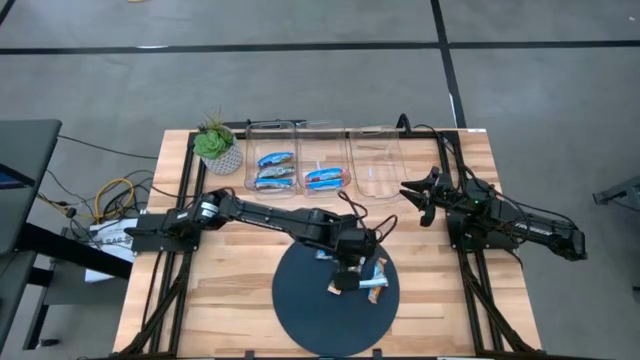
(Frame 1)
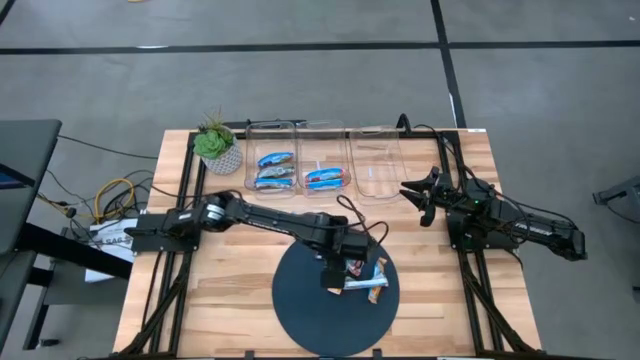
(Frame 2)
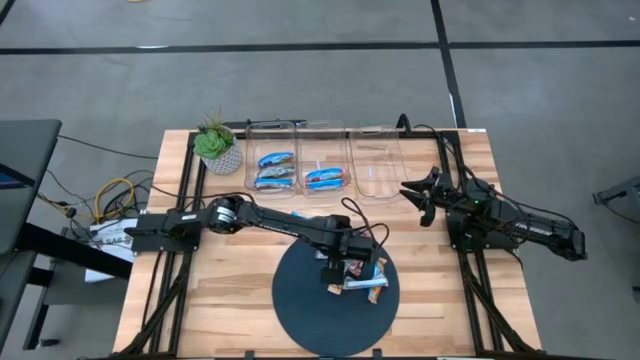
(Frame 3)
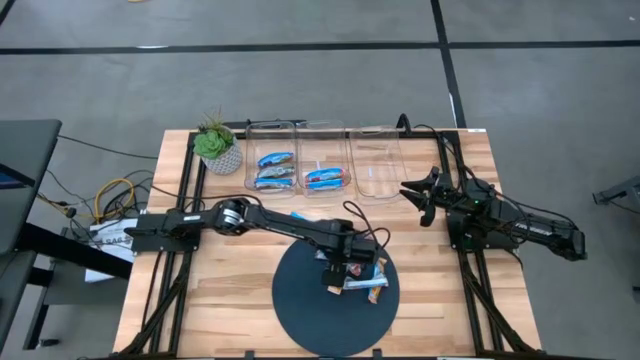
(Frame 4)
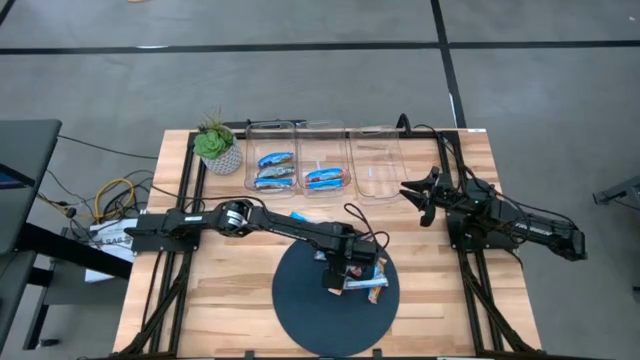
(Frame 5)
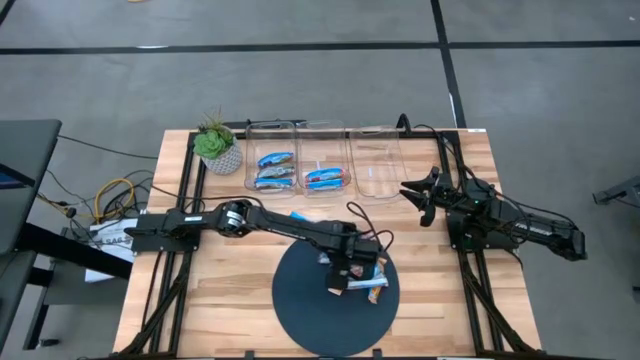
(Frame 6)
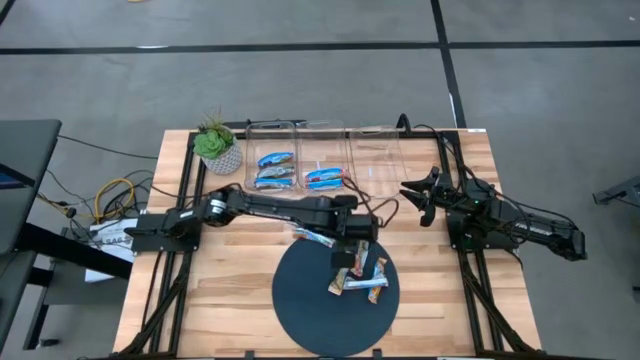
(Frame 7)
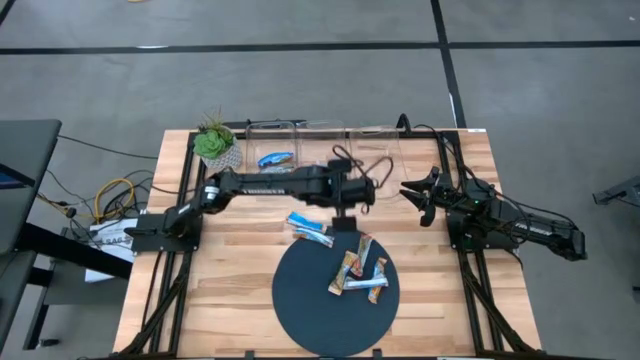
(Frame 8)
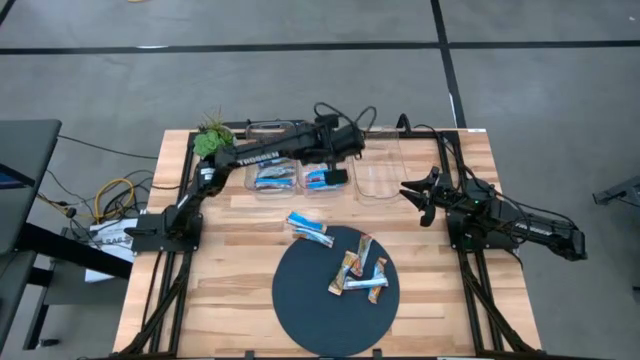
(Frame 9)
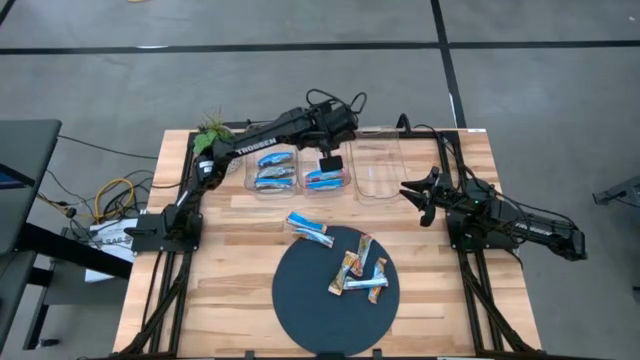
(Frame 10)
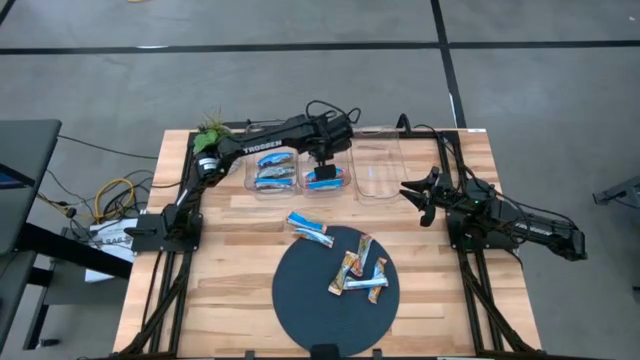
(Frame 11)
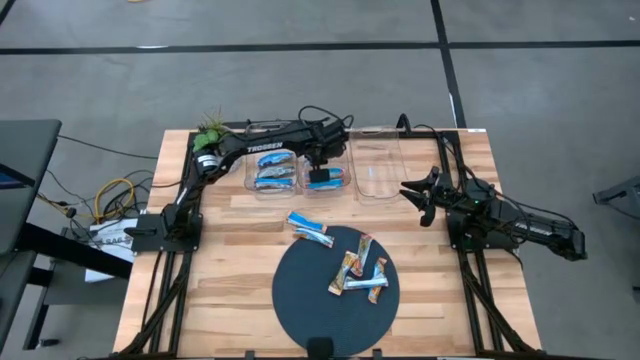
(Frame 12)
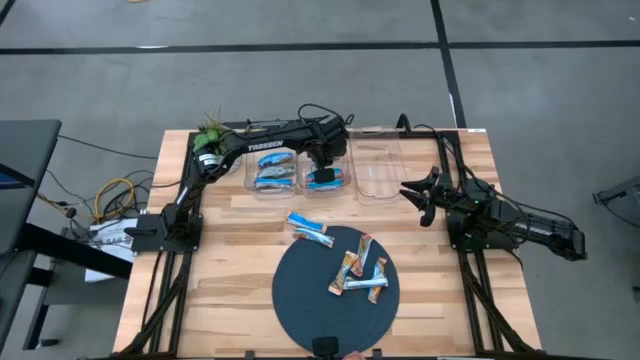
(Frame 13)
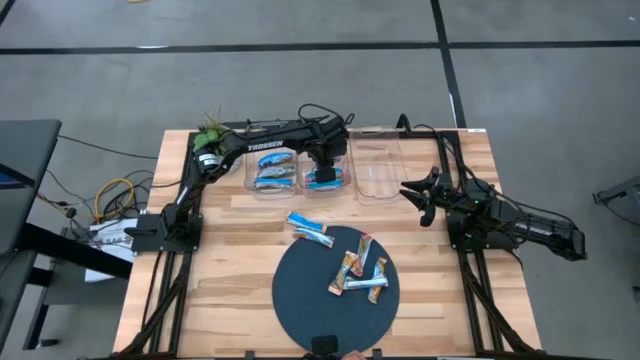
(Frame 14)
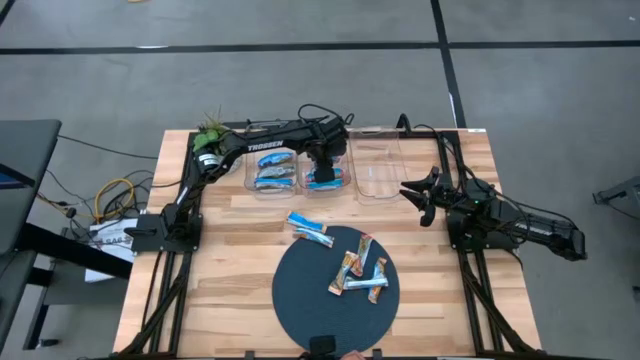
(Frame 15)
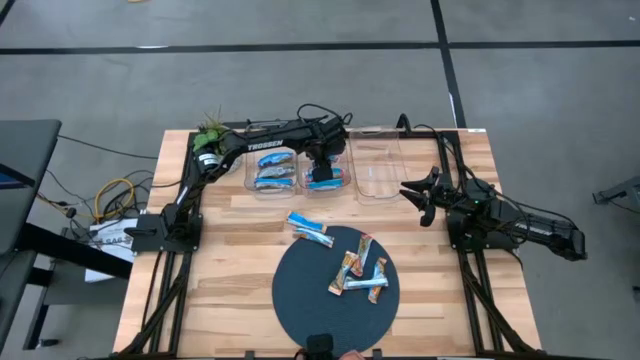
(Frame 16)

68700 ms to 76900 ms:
Task: Pick and place Granola Bars by type
Put the red granola bar into the middle transparent bin

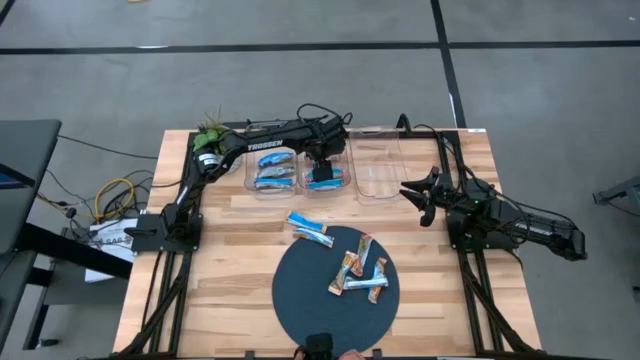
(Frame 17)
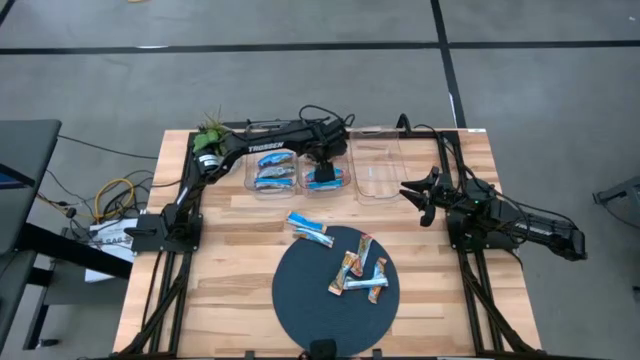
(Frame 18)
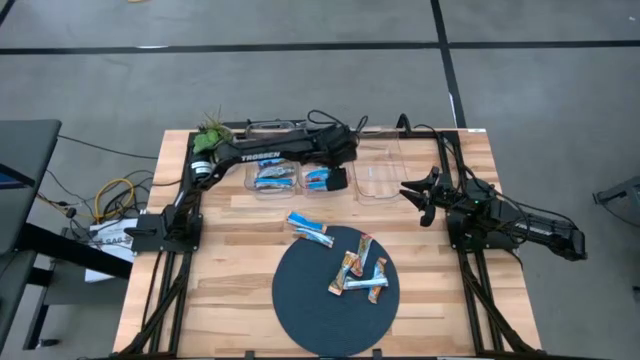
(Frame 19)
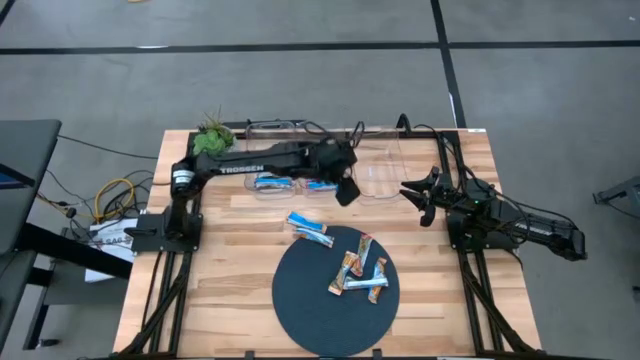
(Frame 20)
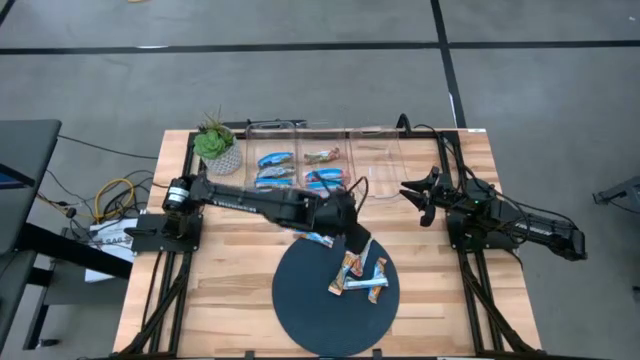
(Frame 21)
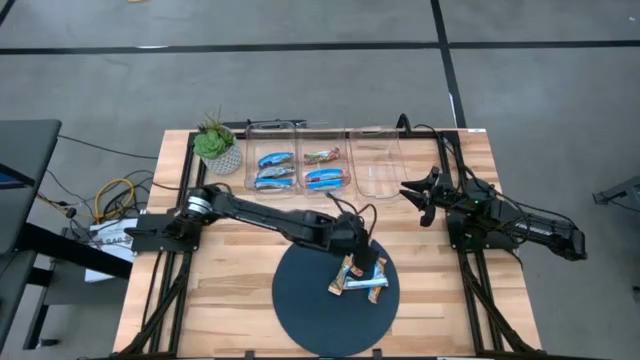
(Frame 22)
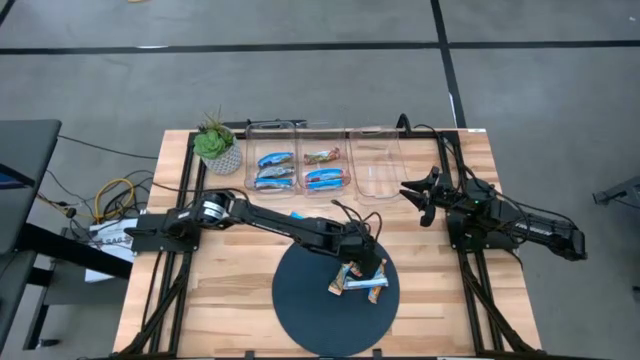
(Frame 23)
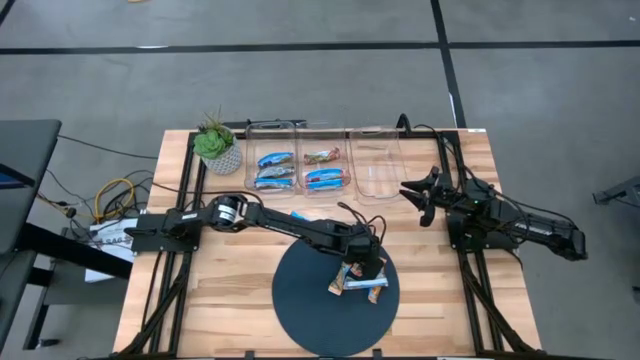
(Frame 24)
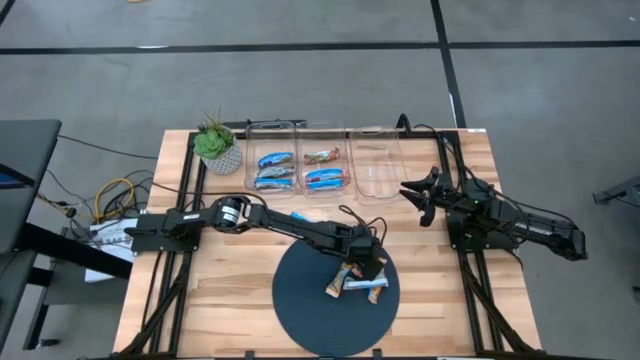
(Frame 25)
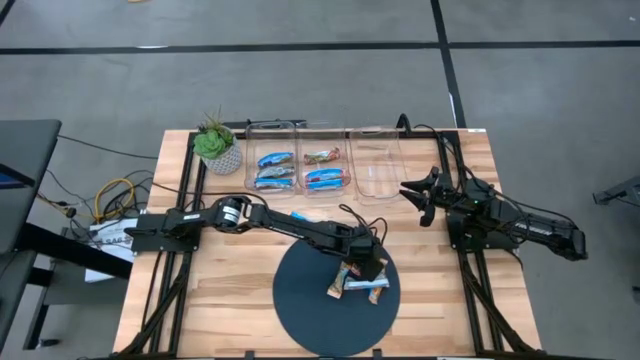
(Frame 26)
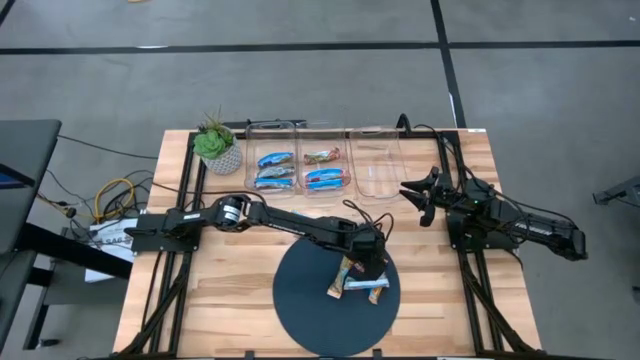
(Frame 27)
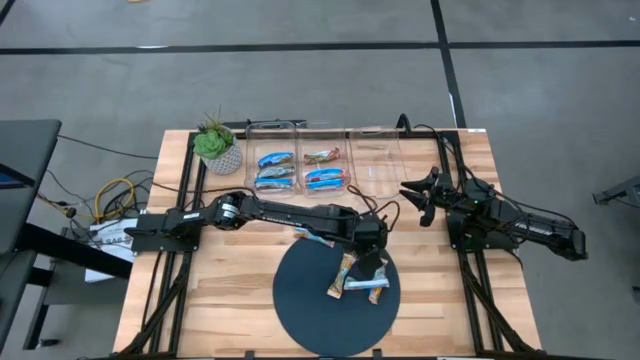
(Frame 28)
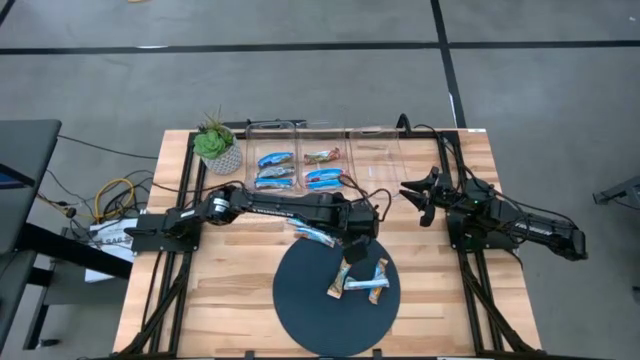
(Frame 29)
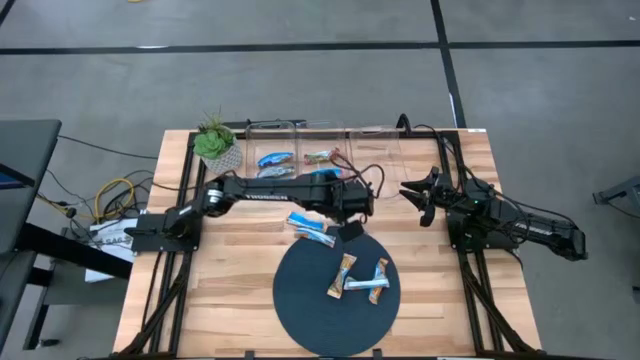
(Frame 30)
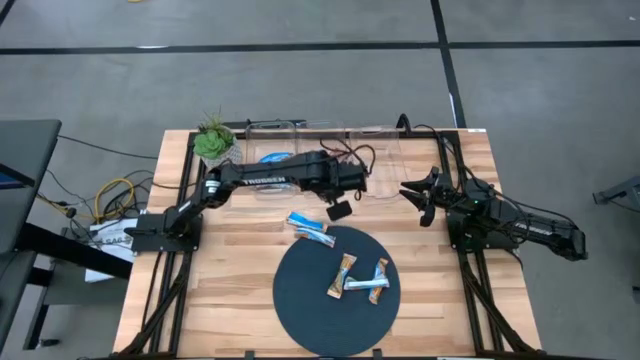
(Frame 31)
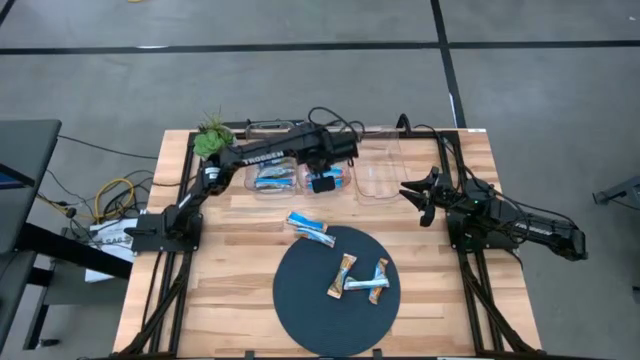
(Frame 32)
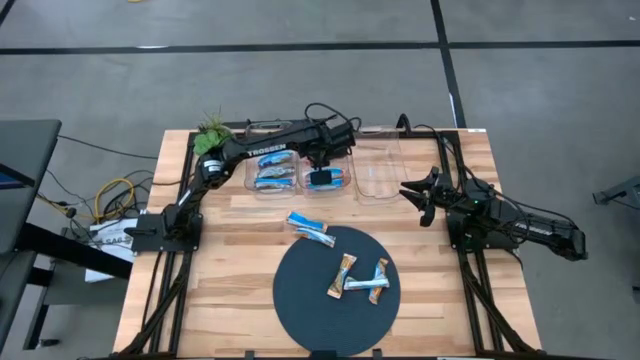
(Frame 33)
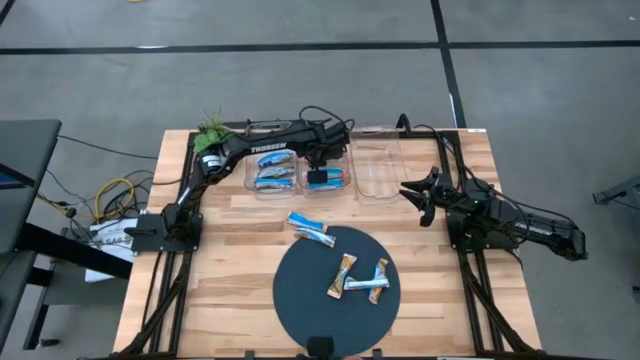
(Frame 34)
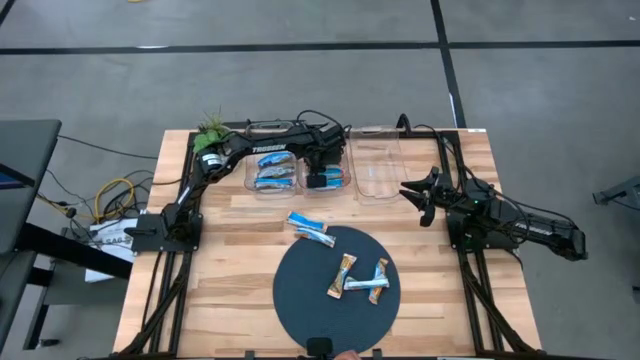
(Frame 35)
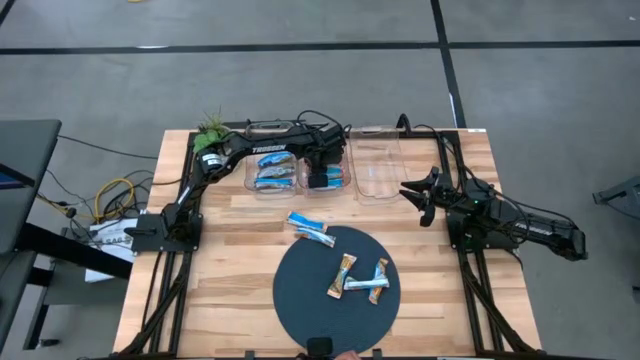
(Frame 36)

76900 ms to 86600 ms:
Put the red granola bar into the middle transparent bin

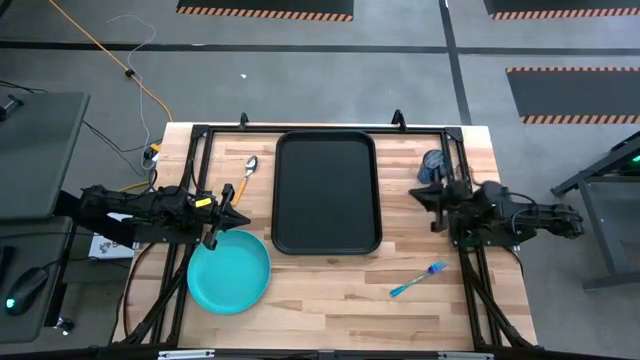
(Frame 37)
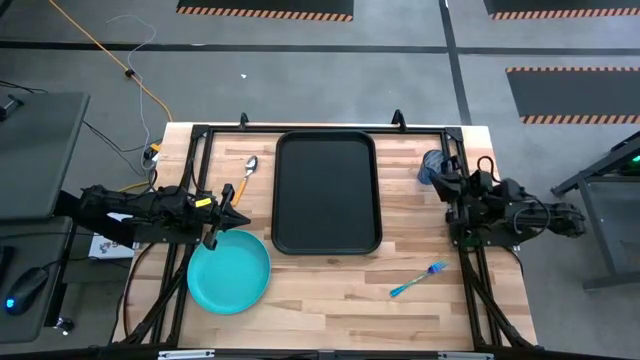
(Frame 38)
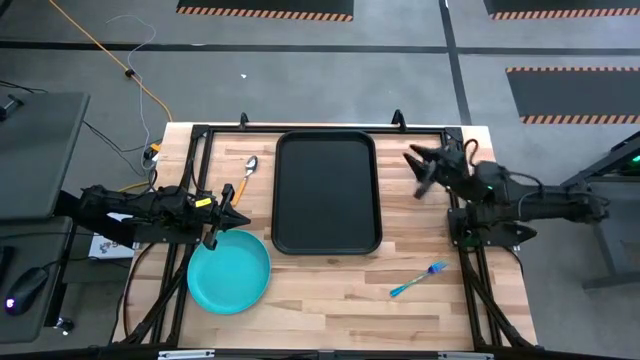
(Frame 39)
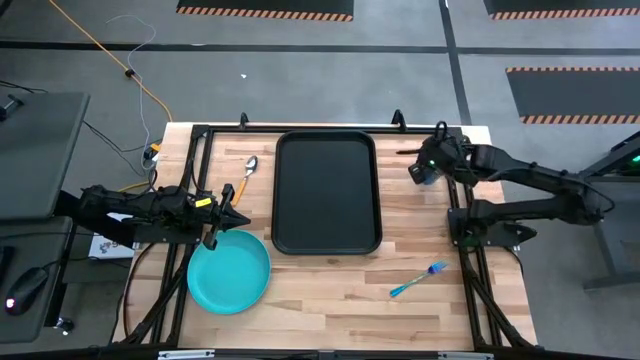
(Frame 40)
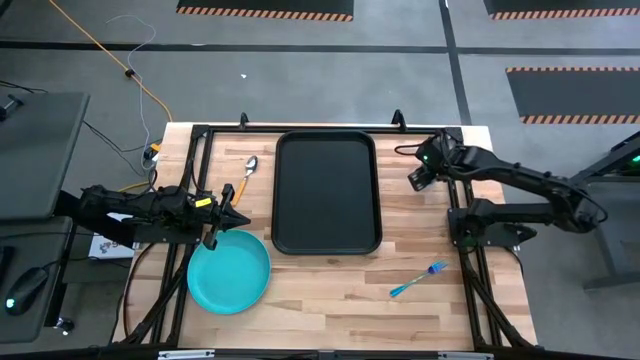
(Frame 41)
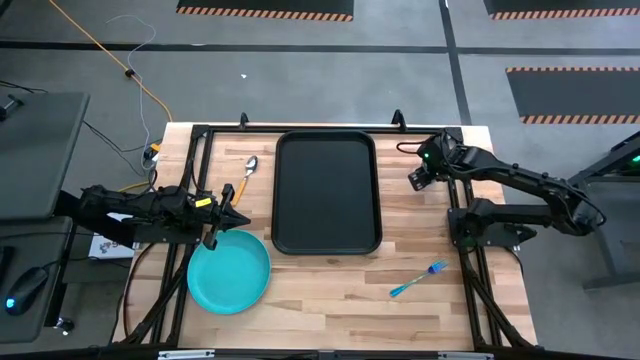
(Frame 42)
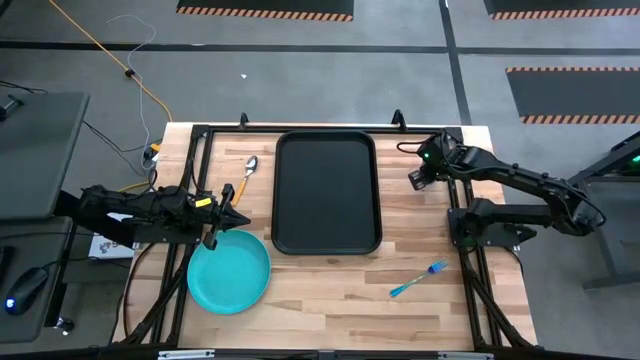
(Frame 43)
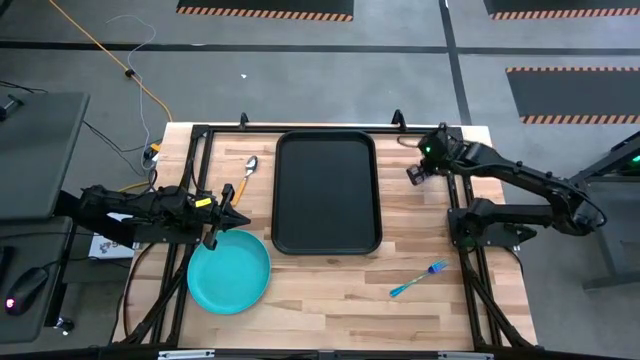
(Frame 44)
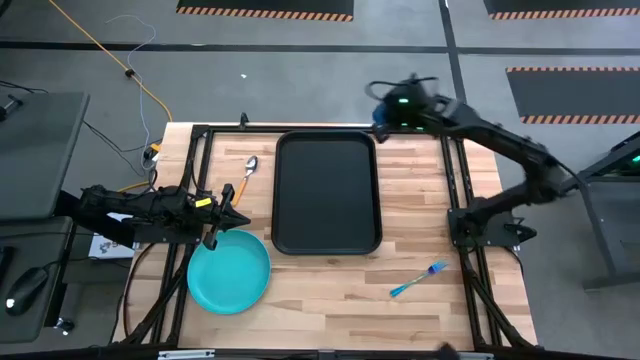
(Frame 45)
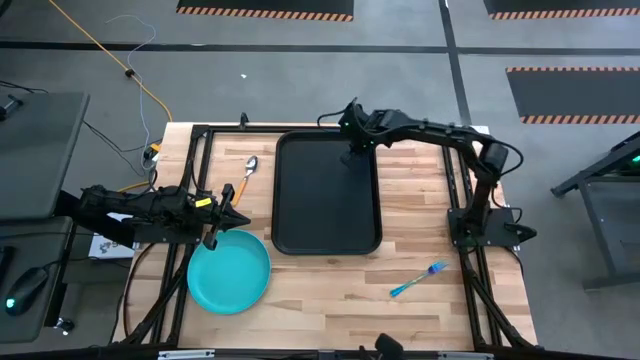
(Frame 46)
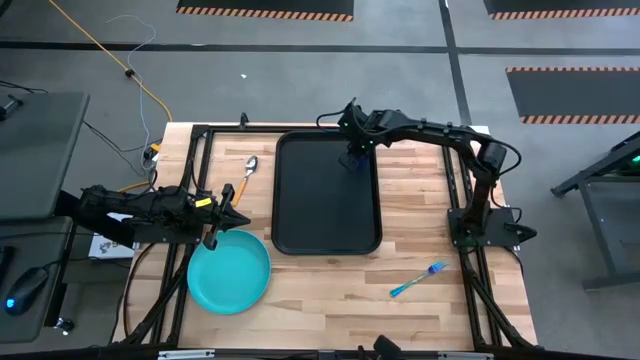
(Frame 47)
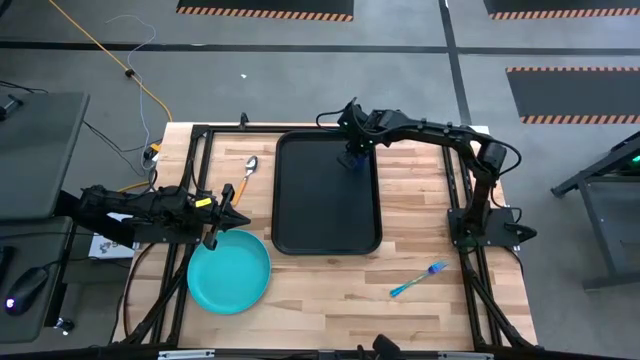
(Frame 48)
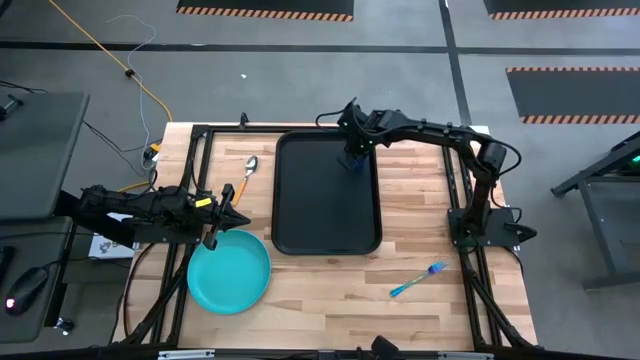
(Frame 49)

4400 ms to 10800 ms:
Task: Pick and place plate/cup/fork/spoon on tray
Put the blue cup on the black tray
